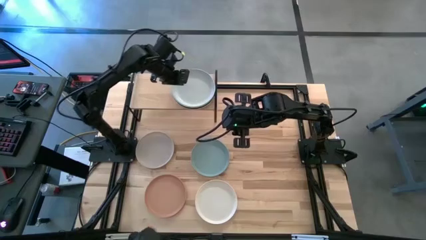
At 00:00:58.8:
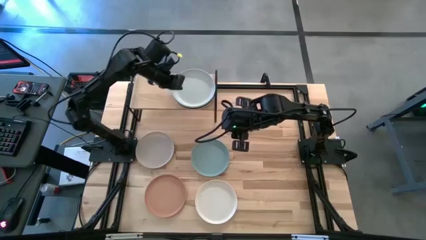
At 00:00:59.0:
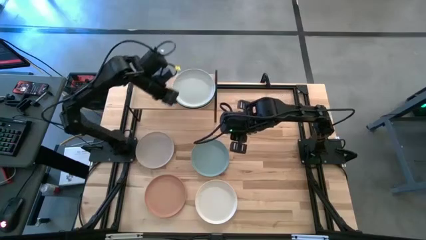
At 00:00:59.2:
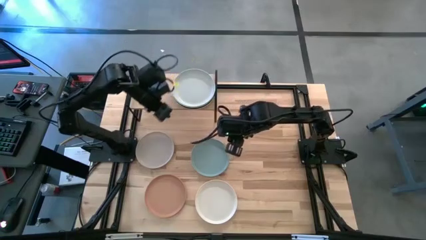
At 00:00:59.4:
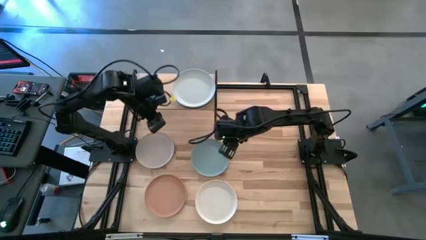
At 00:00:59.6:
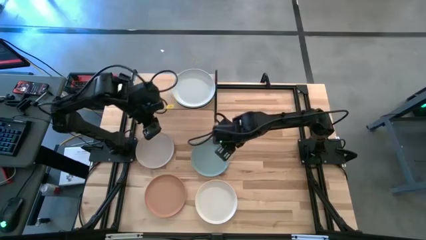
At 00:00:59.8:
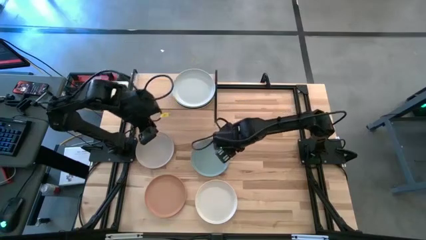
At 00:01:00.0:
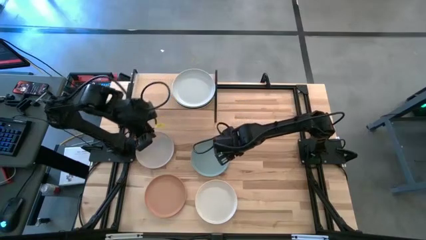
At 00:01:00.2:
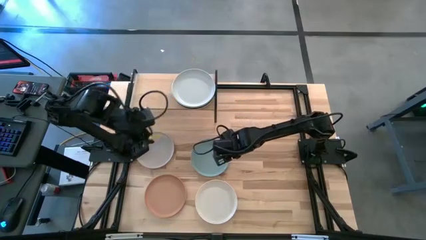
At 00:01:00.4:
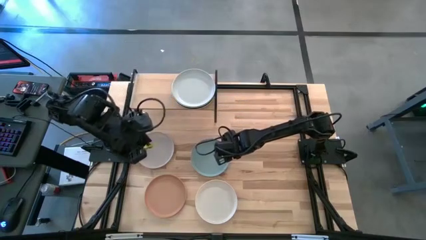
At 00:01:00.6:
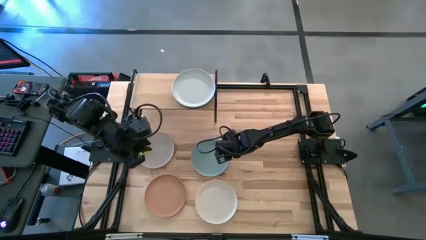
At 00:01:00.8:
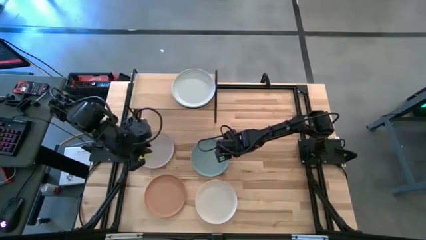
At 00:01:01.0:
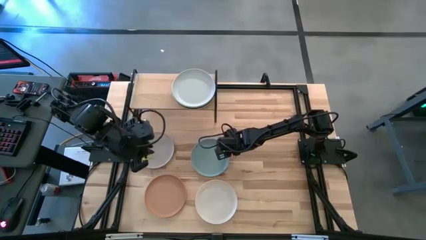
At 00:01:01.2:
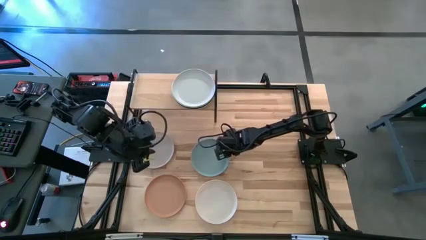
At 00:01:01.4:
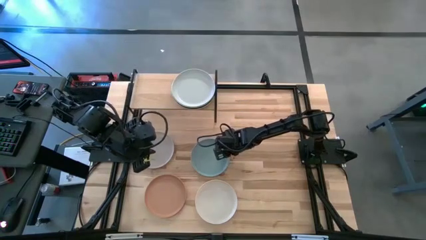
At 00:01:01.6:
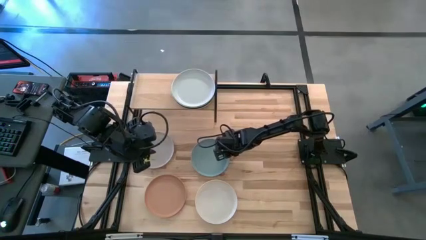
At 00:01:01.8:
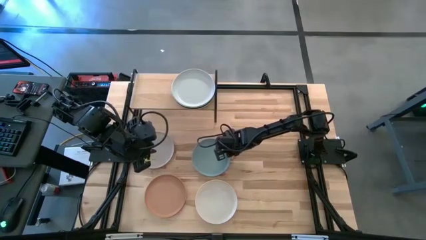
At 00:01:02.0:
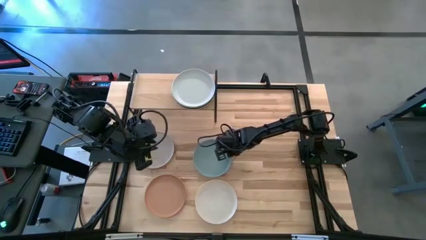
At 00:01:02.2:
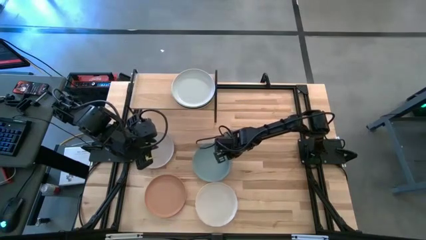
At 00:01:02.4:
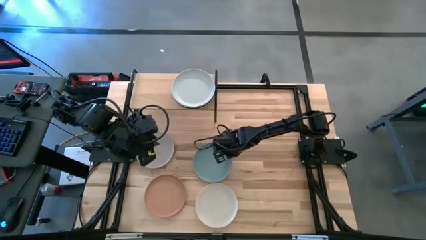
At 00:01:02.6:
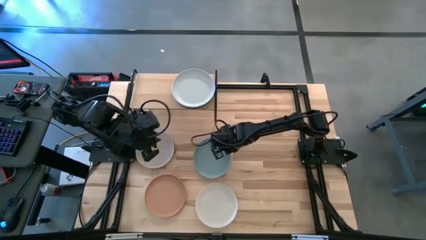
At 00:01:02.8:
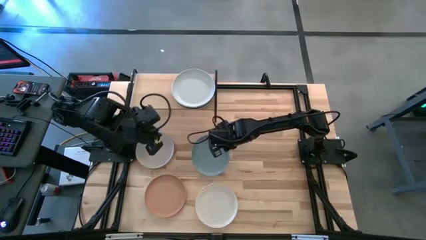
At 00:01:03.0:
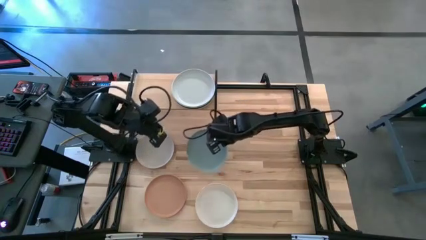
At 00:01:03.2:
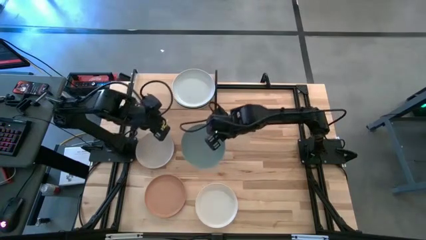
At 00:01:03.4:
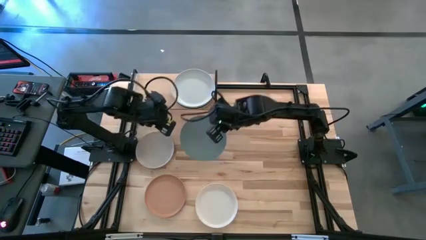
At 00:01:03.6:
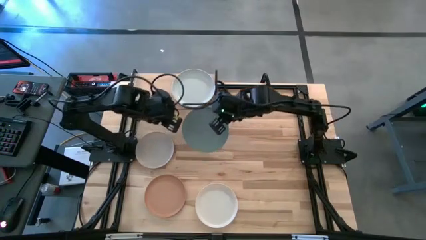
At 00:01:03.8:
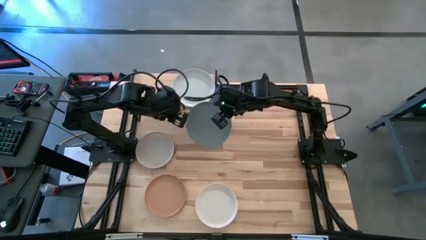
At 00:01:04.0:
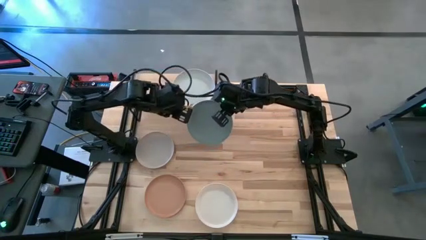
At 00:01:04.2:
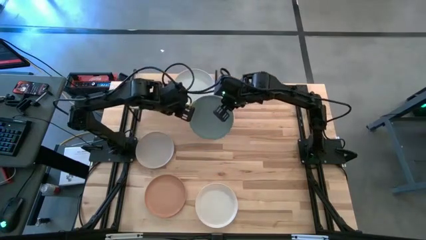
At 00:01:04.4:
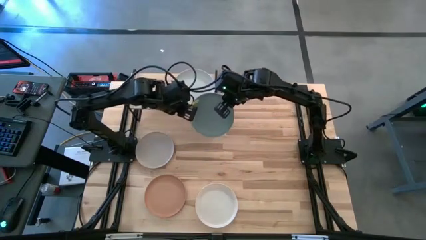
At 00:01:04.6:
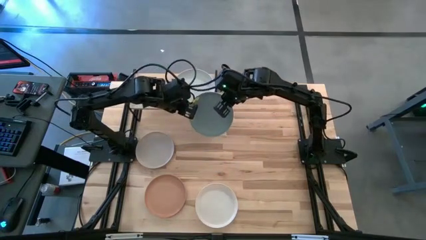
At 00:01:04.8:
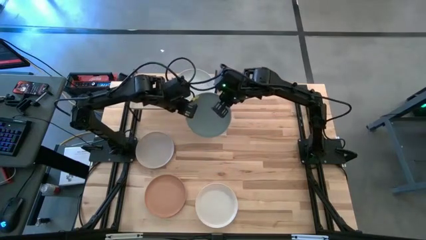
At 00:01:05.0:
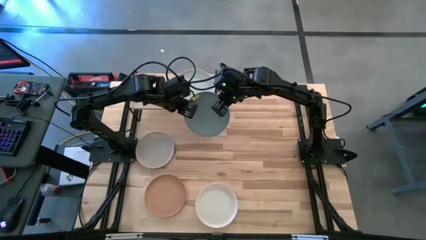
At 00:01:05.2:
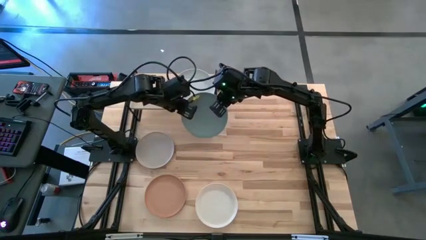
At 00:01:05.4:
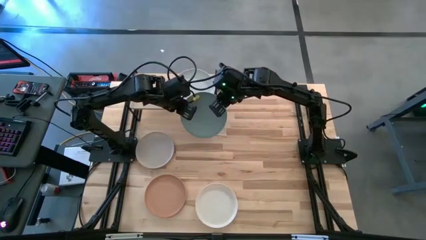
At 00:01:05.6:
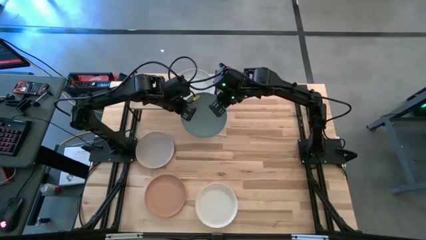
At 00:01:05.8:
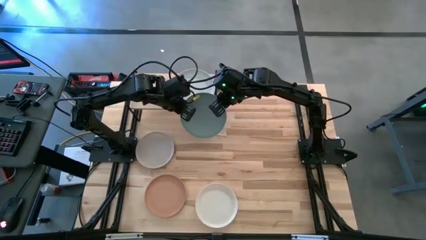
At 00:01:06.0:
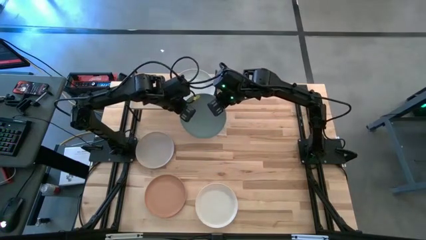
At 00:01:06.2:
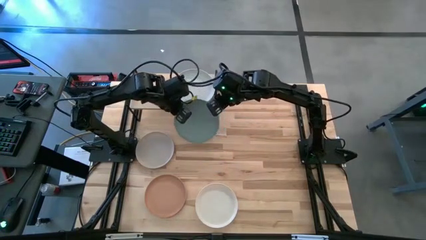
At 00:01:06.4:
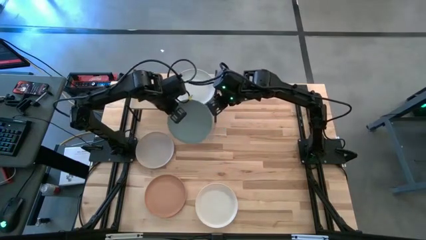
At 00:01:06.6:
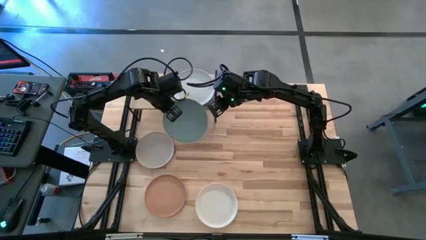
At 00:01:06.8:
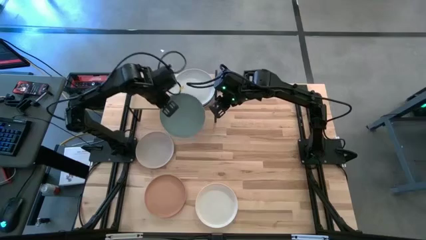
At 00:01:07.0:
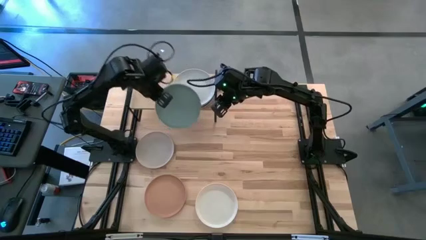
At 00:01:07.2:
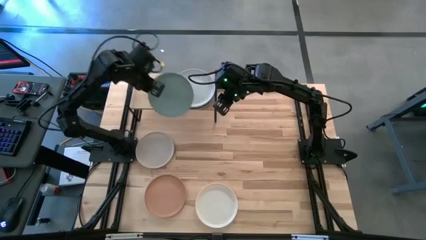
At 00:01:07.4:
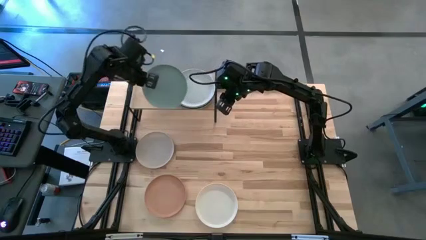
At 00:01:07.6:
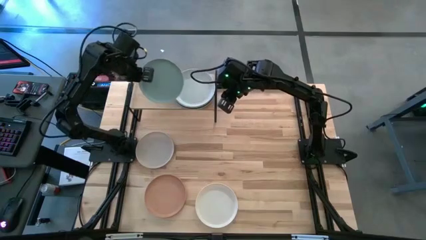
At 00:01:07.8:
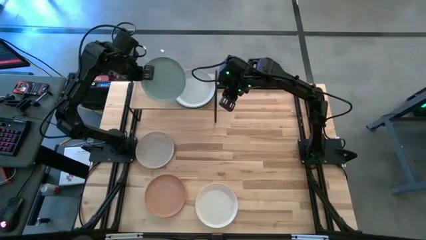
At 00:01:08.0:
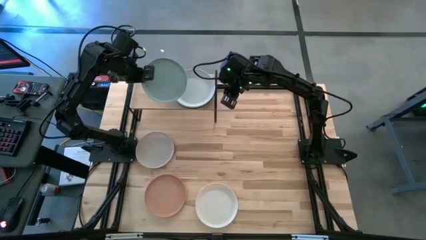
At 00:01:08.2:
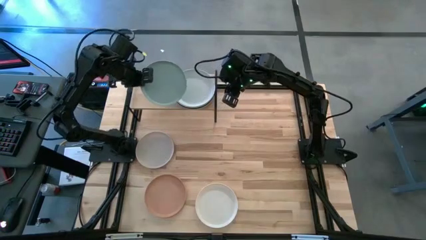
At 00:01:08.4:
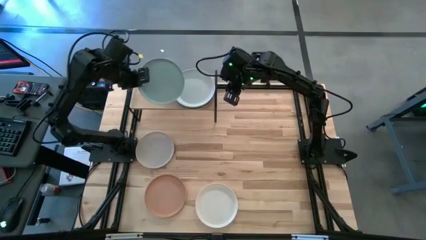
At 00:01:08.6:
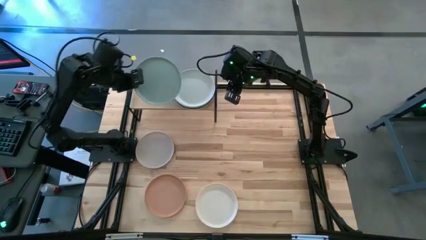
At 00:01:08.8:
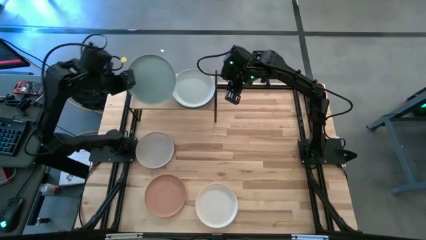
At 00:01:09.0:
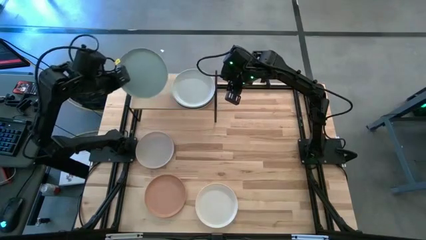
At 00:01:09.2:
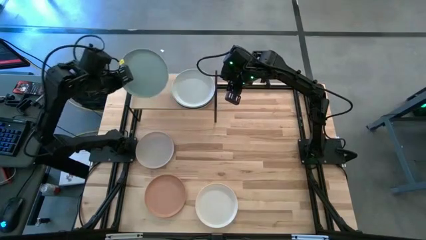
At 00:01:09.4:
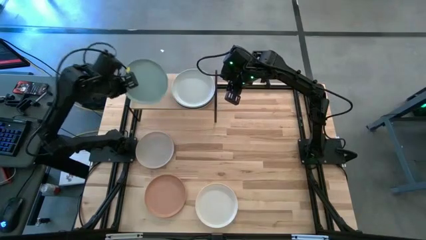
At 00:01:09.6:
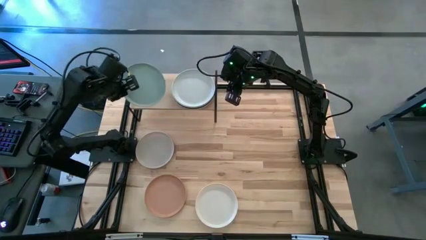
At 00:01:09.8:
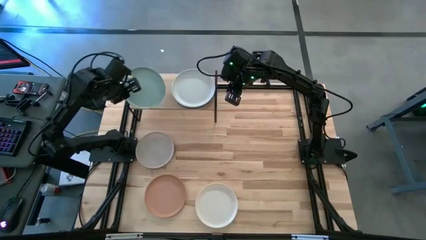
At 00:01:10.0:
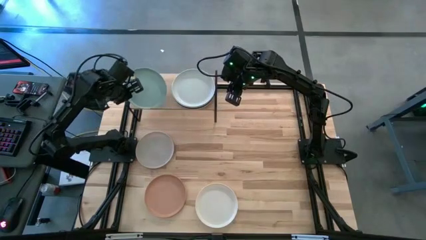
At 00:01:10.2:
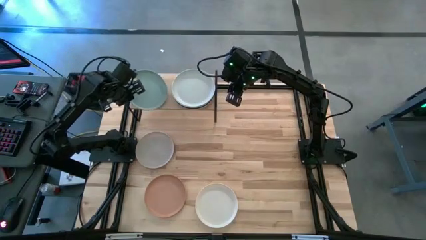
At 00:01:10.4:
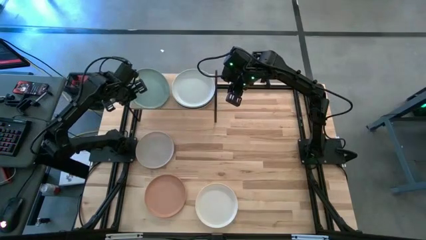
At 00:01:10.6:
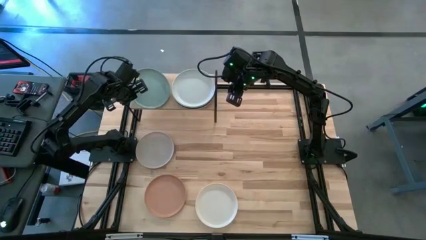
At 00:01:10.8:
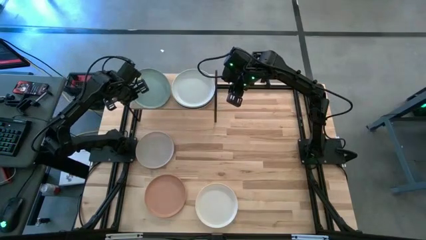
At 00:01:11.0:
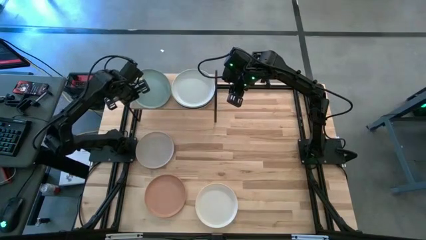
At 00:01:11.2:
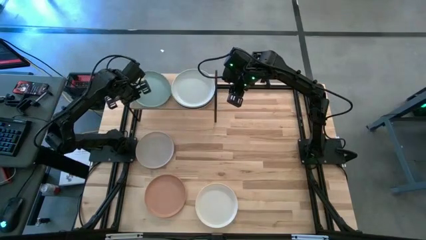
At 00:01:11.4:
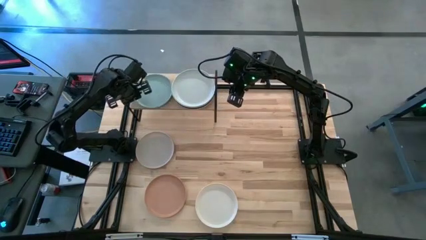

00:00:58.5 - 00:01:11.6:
Task: Place and stack plates onto a shelf
Put the blue plate on the shelf
